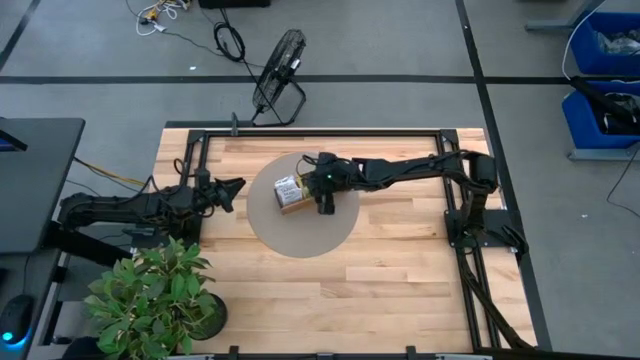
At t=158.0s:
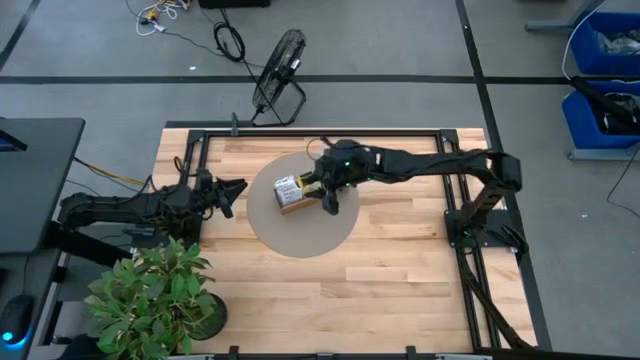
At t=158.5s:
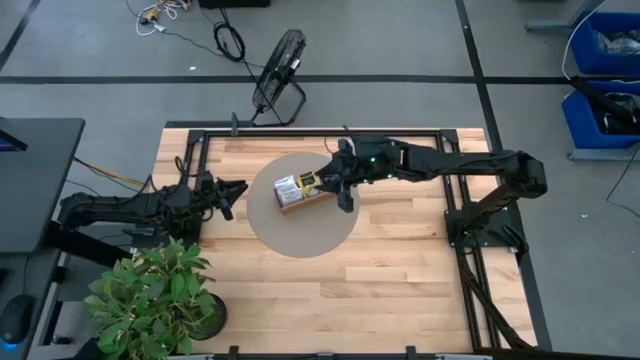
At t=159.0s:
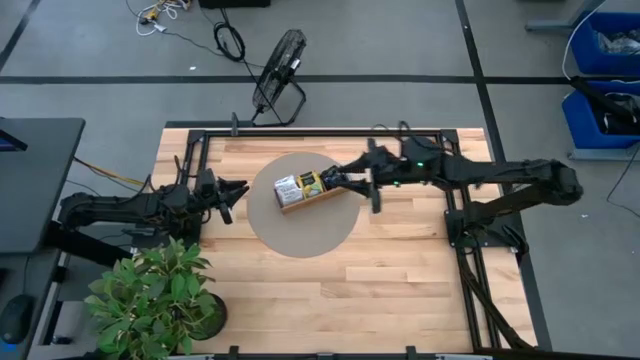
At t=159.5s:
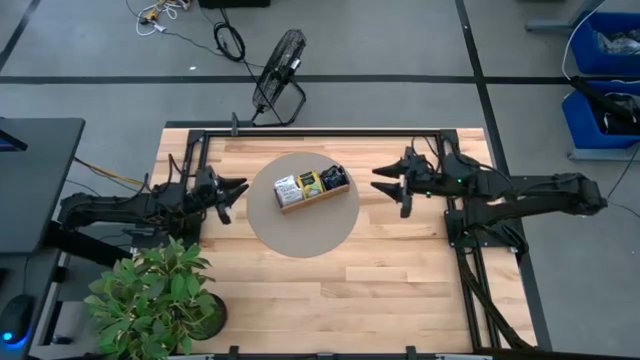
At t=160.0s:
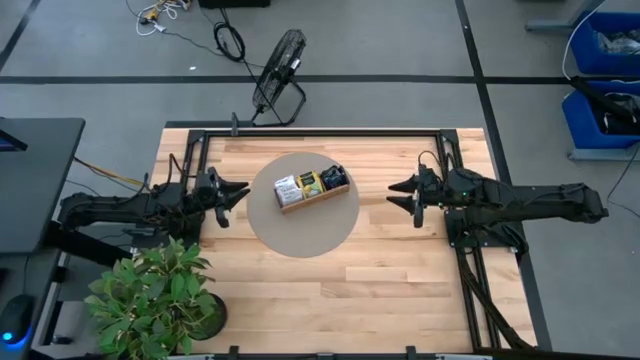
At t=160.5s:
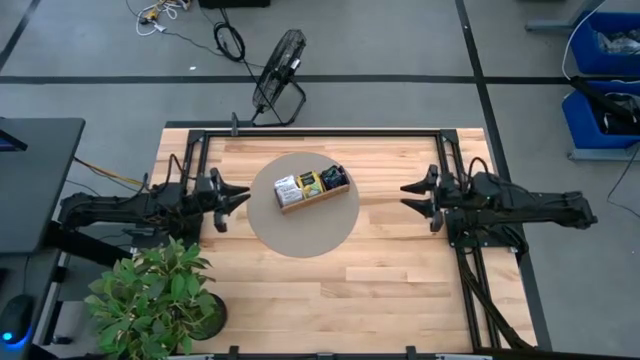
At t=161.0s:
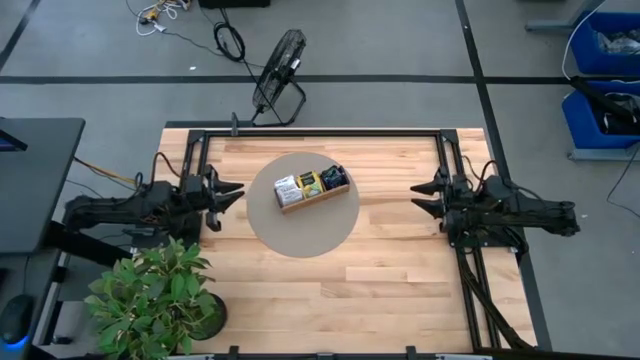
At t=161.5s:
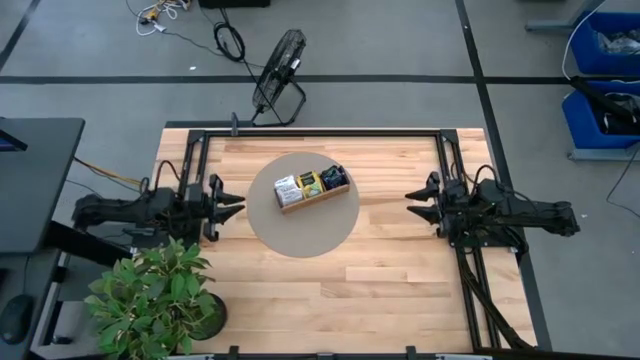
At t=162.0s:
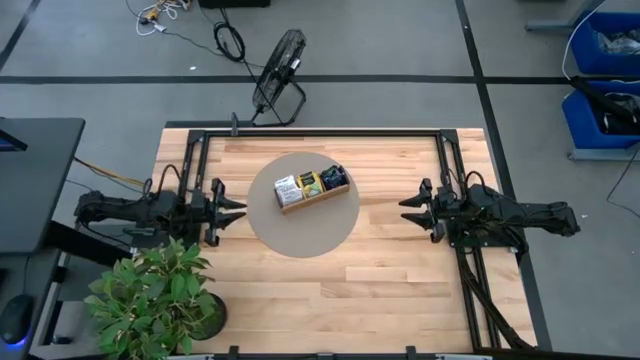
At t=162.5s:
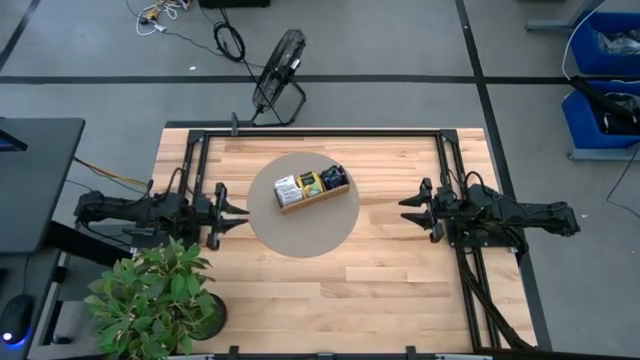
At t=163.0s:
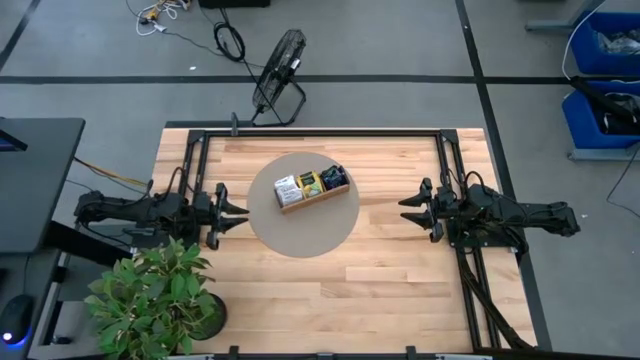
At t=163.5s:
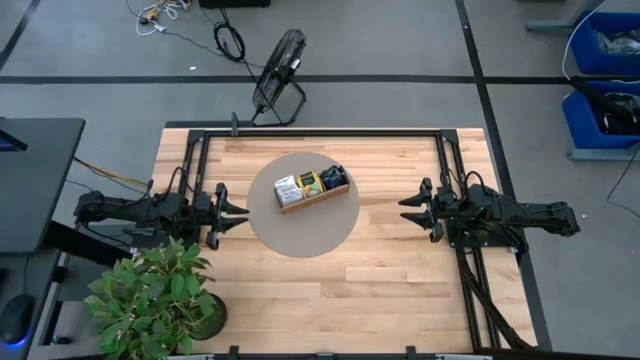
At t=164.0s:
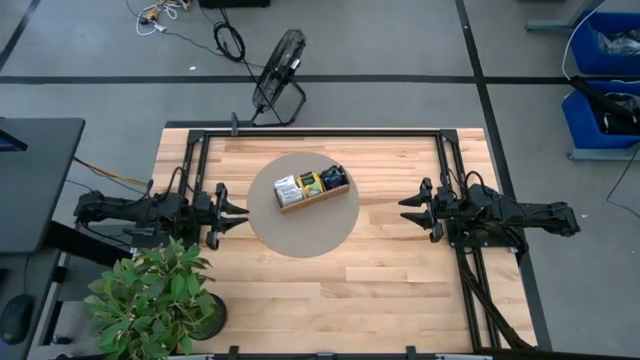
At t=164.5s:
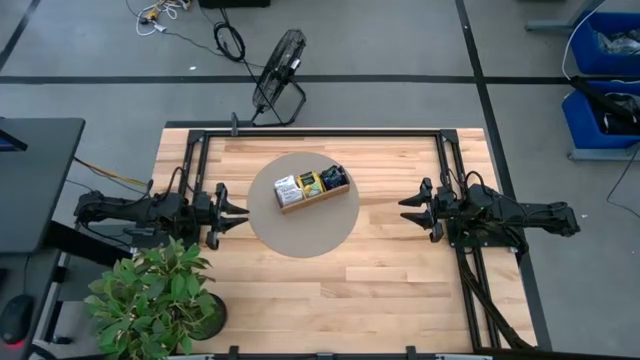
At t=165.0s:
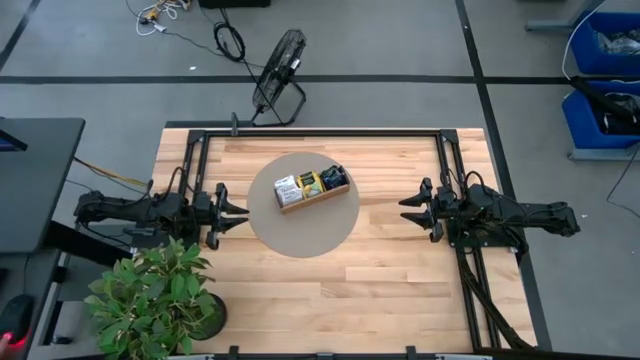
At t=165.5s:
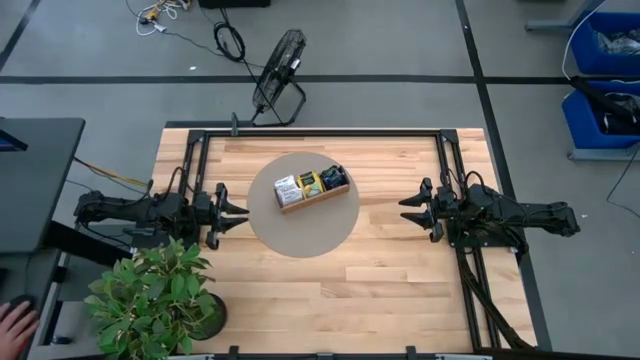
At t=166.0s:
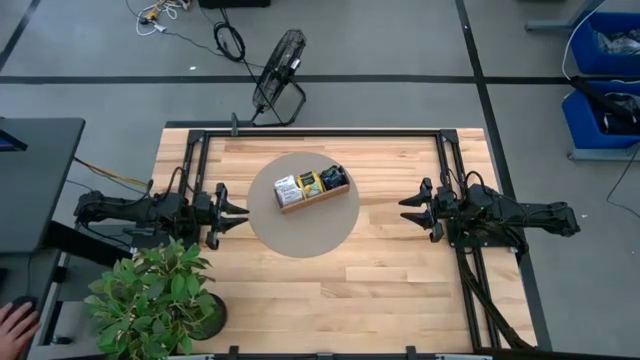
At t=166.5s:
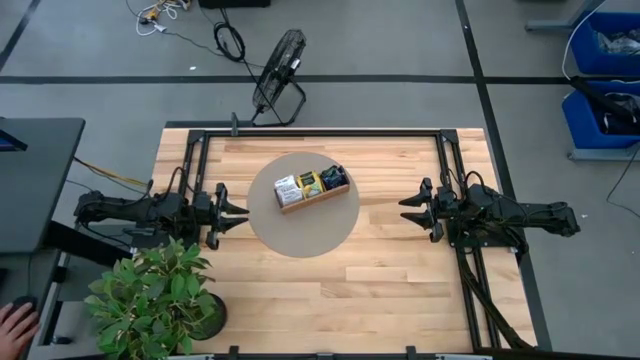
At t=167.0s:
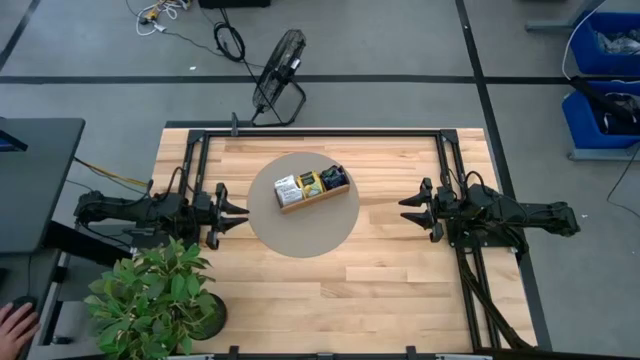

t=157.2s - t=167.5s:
Task: Pick & Place Tea
Return to Home Position

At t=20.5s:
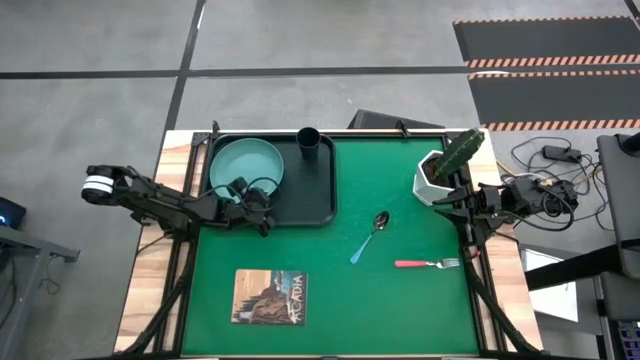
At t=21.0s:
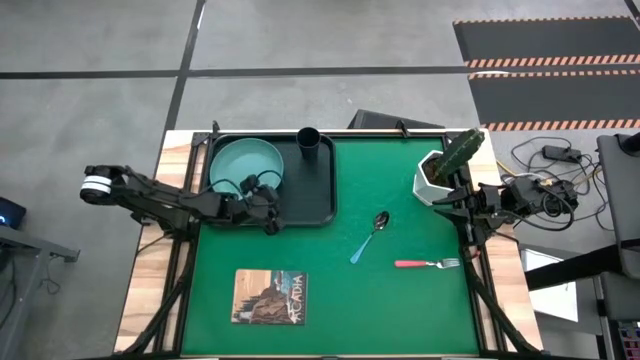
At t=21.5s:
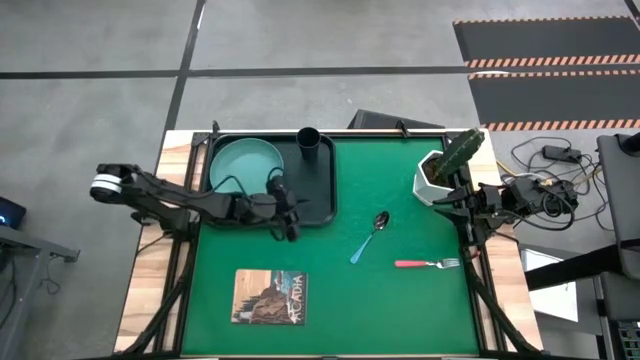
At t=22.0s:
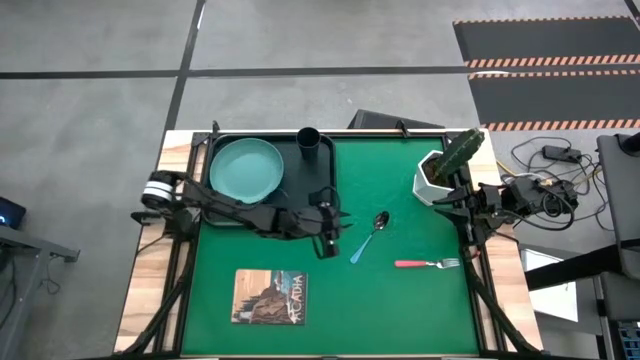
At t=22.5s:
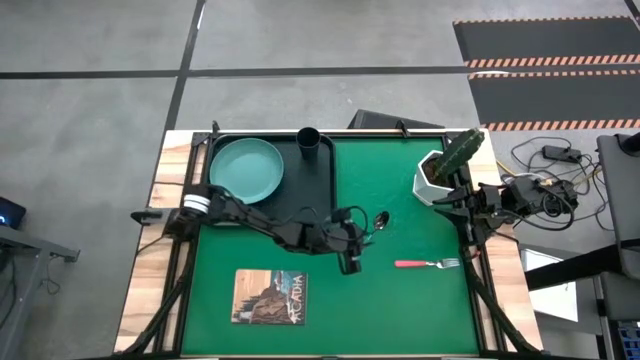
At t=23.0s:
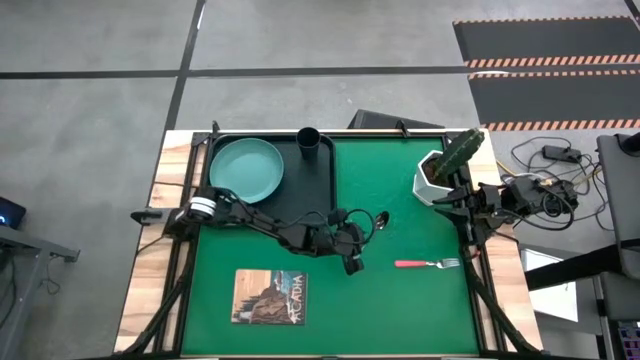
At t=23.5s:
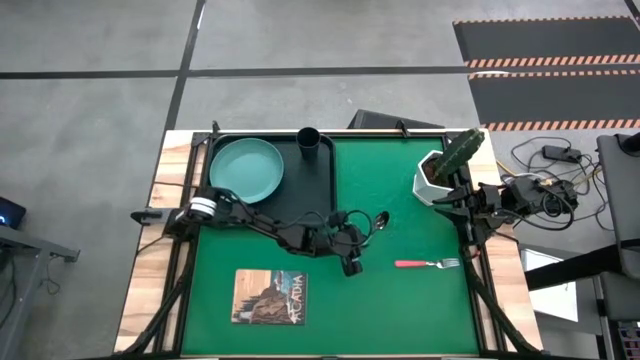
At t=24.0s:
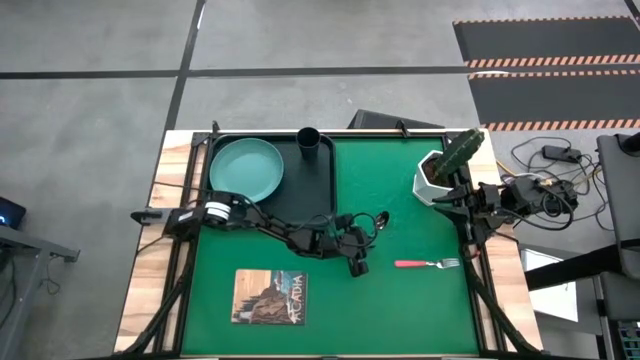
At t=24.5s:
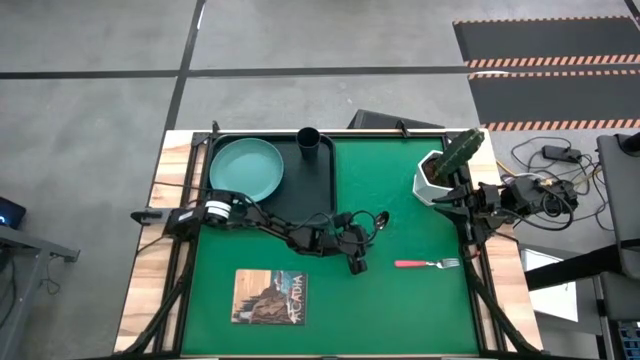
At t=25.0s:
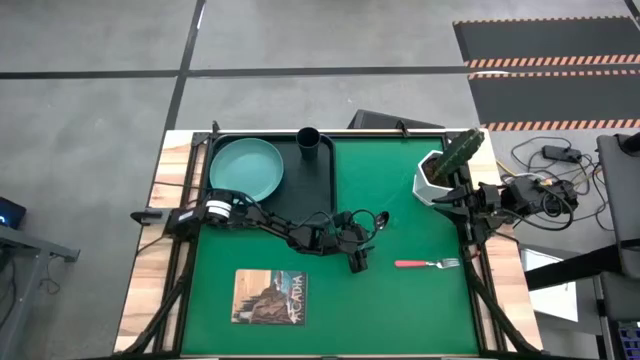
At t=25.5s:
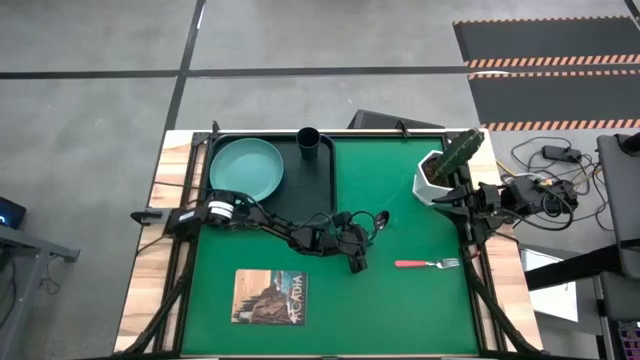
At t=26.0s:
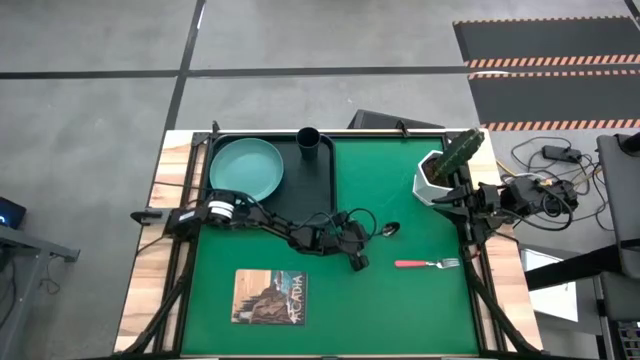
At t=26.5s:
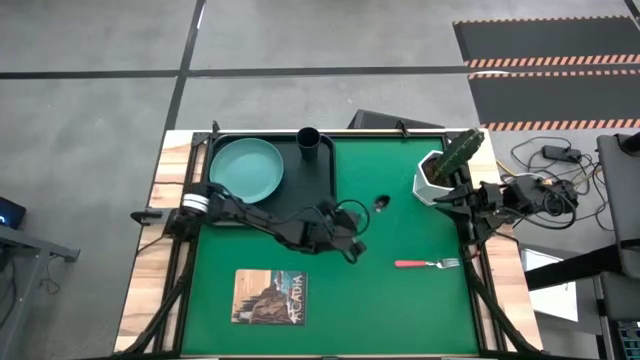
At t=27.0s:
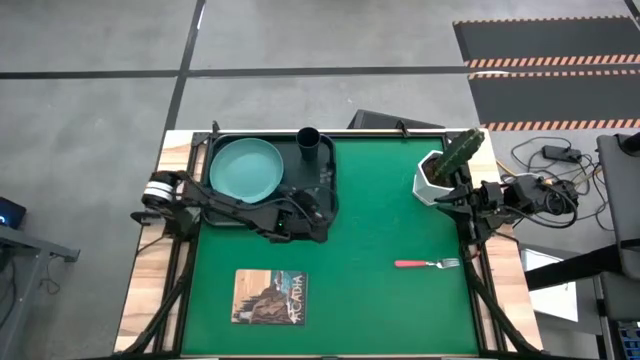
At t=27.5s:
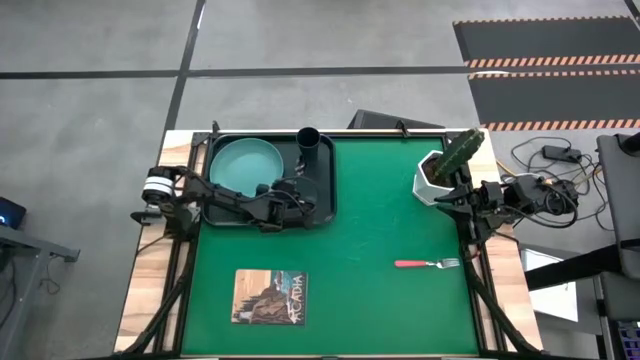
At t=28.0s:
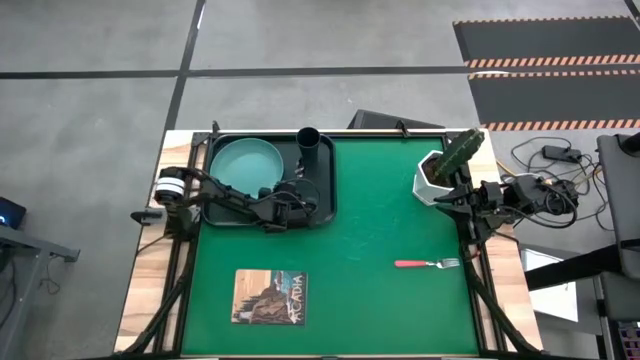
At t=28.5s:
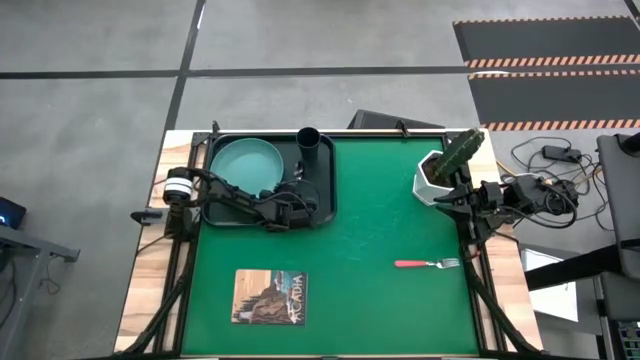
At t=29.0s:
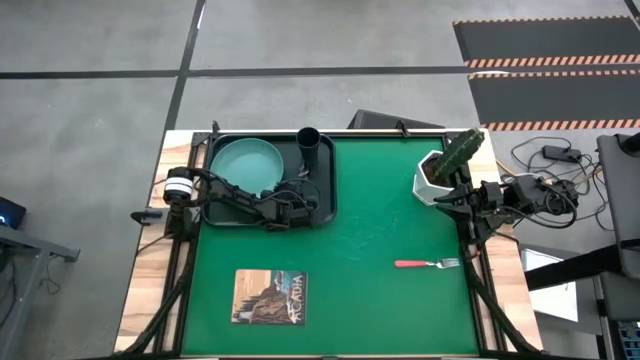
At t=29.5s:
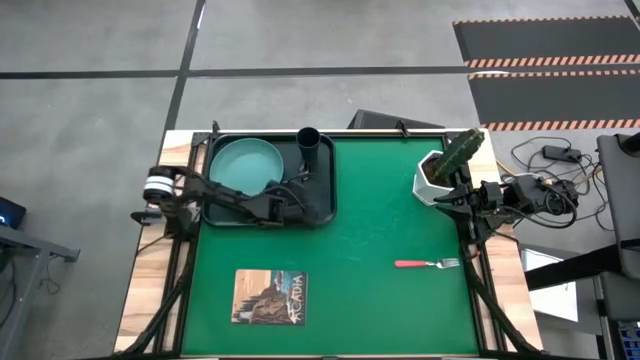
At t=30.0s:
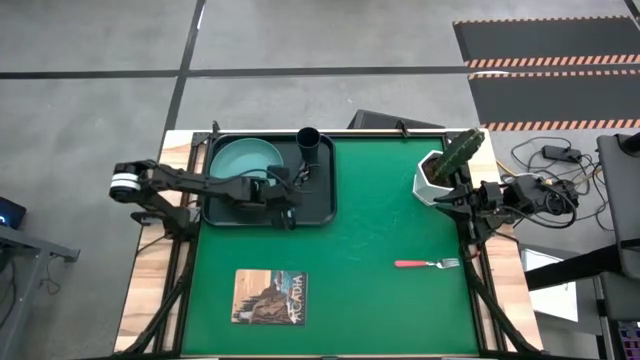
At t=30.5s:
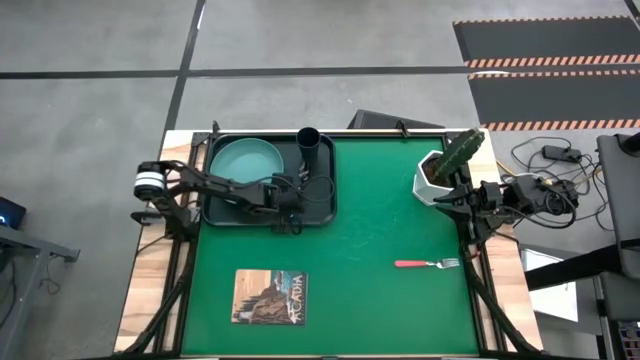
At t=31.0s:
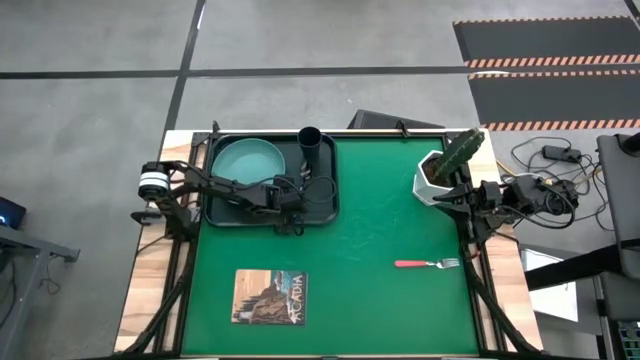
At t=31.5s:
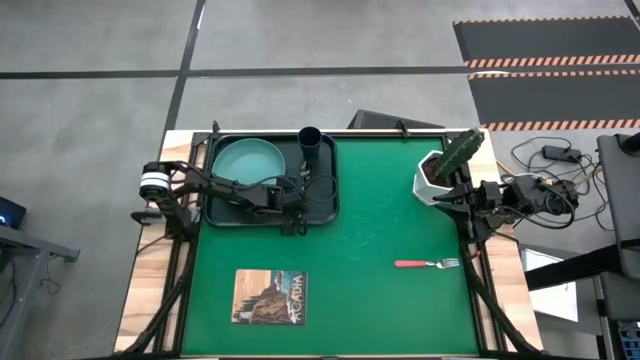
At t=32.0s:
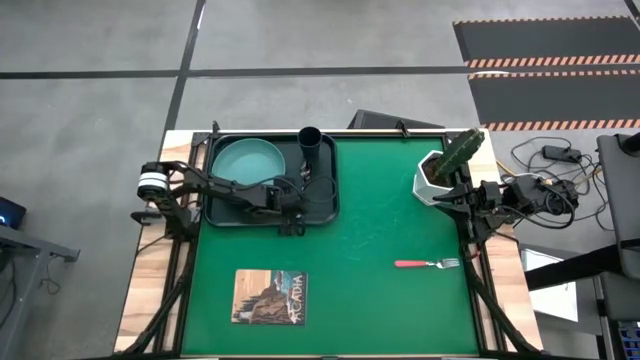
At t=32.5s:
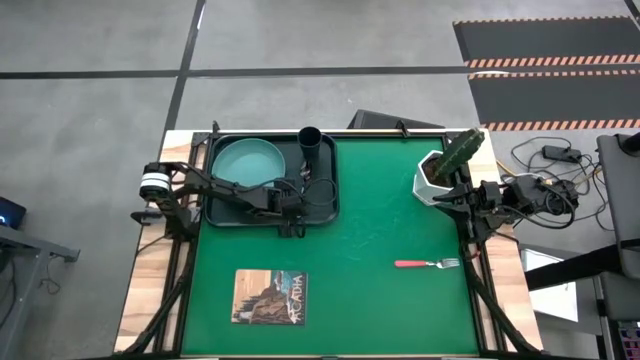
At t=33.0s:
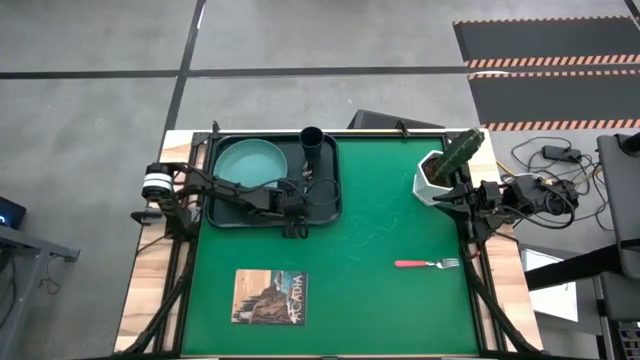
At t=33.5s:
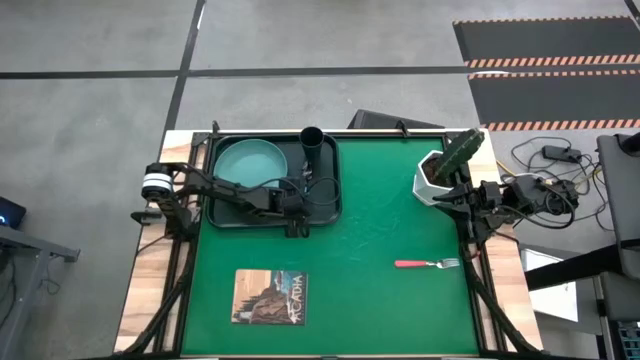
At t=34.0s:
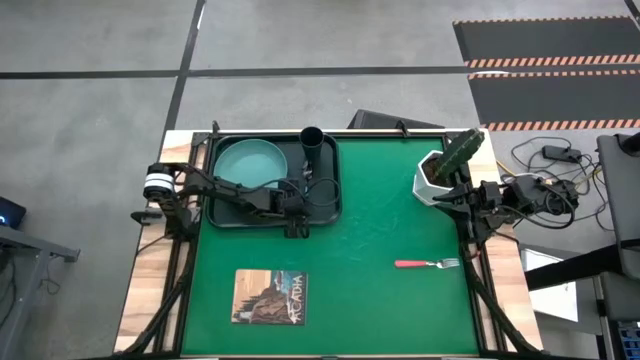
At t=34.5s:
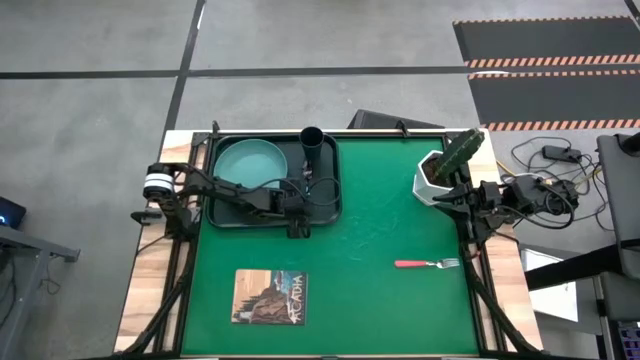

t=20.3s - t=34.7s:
Task: Pick and place plate/cup/fork/spoon on tray
Put the blue spoon on the black tray to the right of the green plate
